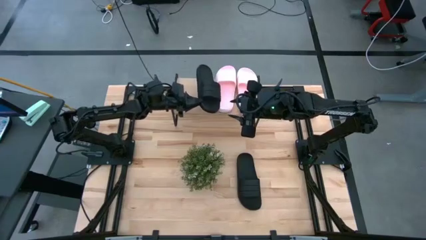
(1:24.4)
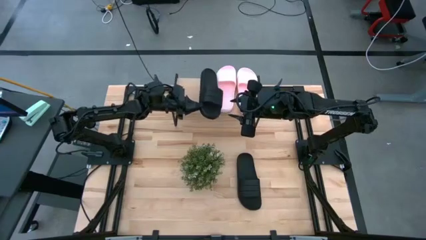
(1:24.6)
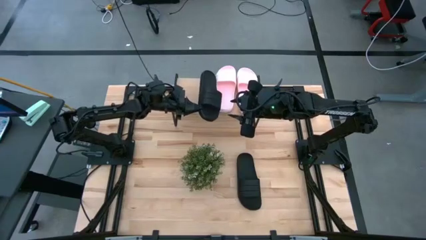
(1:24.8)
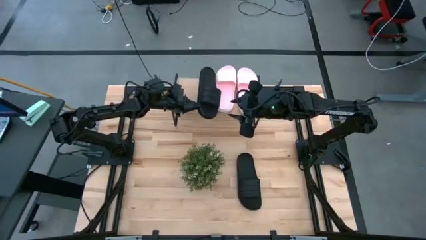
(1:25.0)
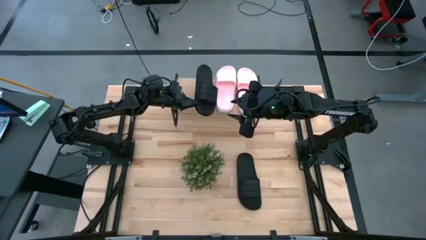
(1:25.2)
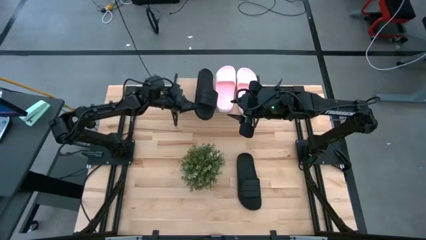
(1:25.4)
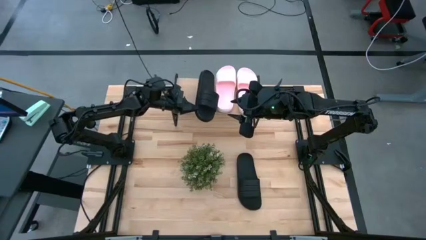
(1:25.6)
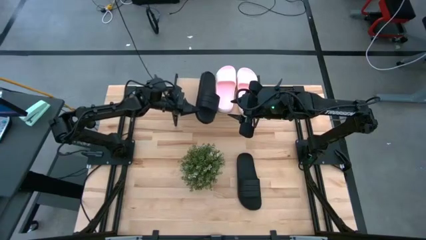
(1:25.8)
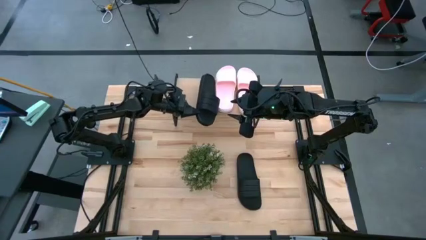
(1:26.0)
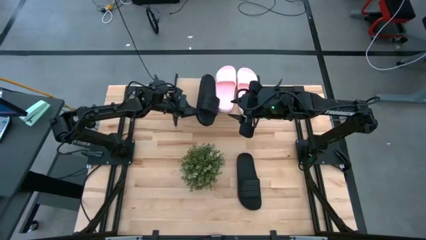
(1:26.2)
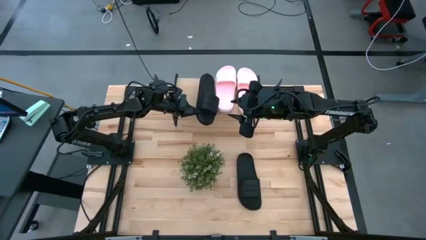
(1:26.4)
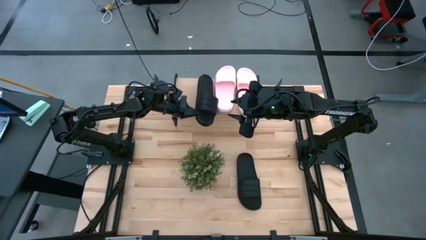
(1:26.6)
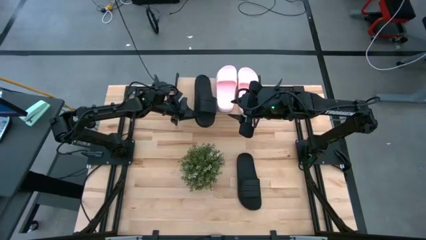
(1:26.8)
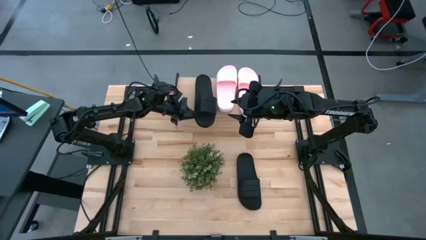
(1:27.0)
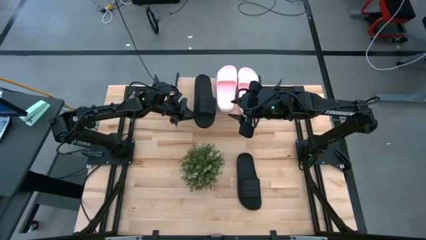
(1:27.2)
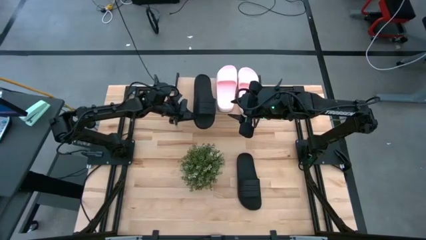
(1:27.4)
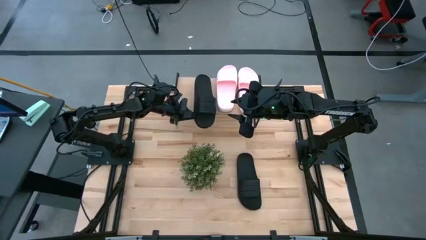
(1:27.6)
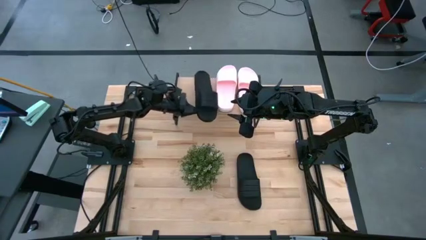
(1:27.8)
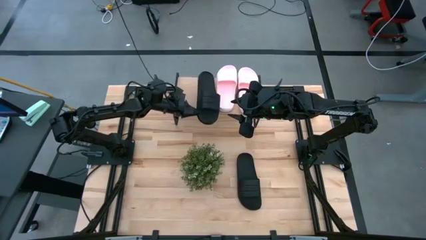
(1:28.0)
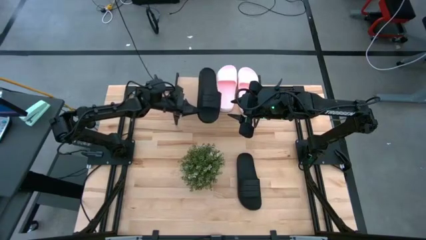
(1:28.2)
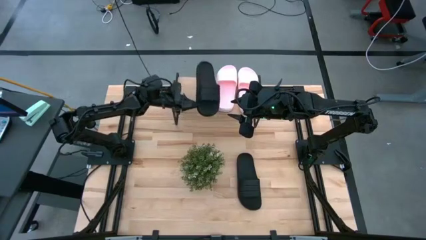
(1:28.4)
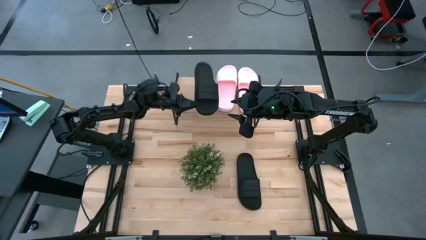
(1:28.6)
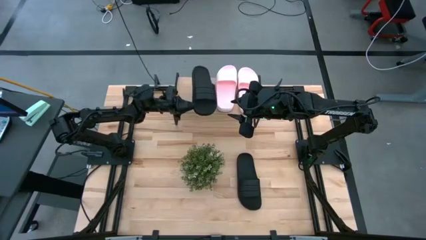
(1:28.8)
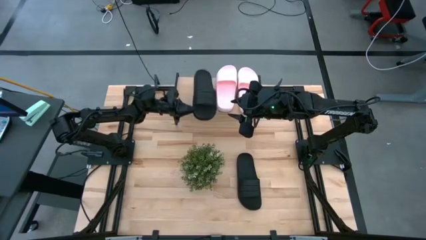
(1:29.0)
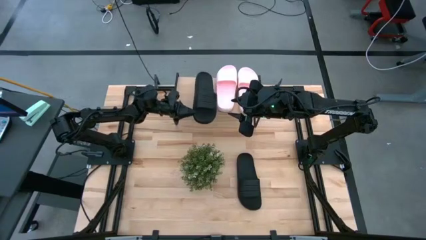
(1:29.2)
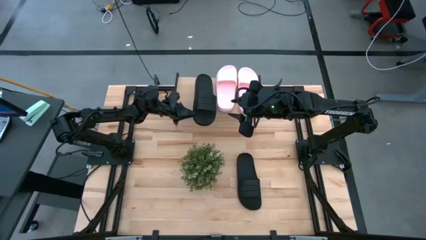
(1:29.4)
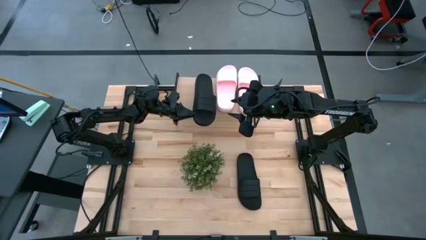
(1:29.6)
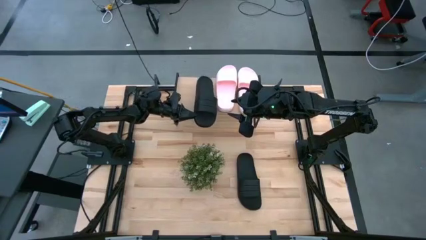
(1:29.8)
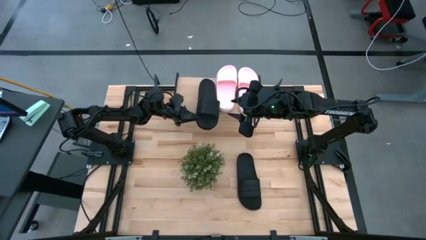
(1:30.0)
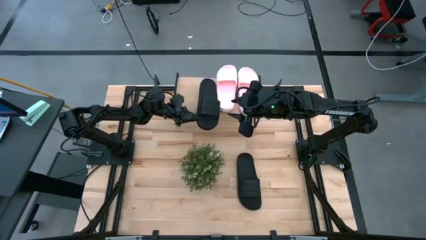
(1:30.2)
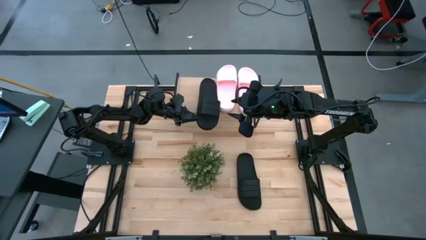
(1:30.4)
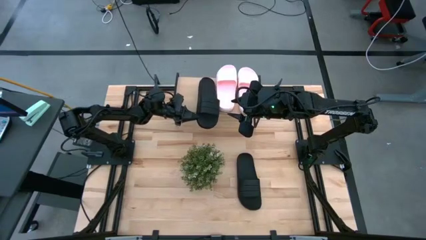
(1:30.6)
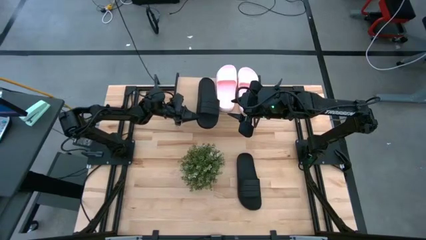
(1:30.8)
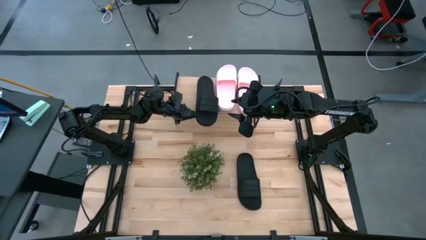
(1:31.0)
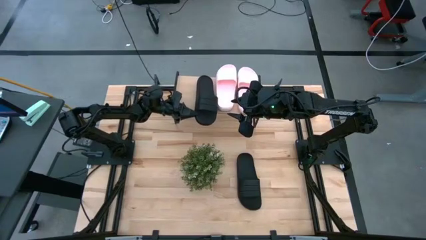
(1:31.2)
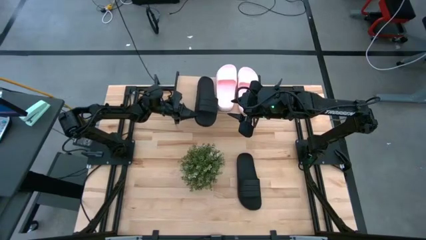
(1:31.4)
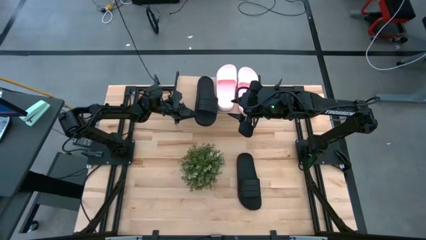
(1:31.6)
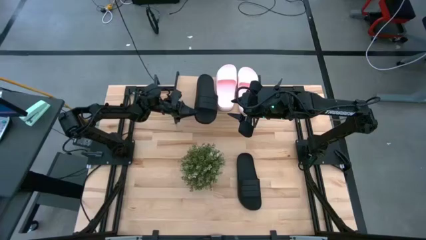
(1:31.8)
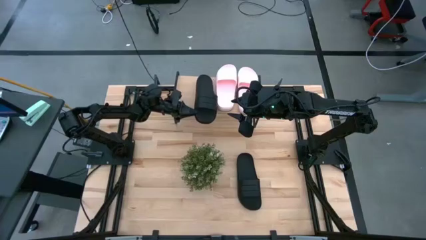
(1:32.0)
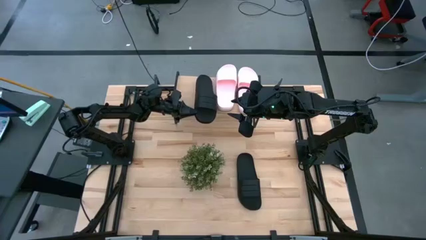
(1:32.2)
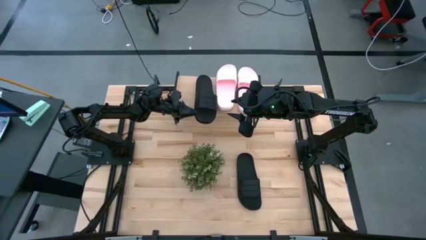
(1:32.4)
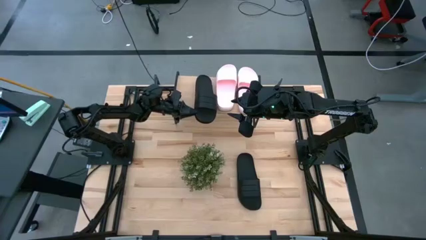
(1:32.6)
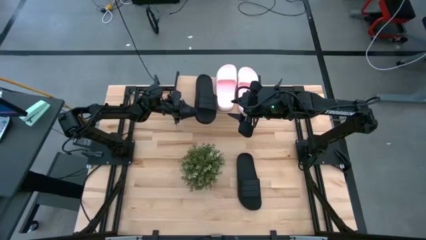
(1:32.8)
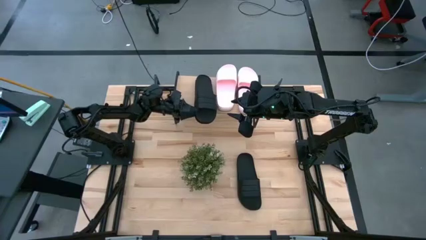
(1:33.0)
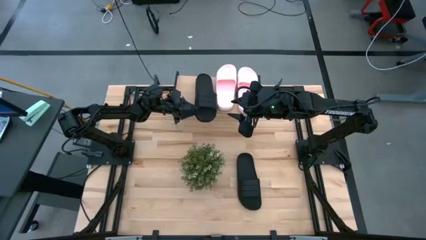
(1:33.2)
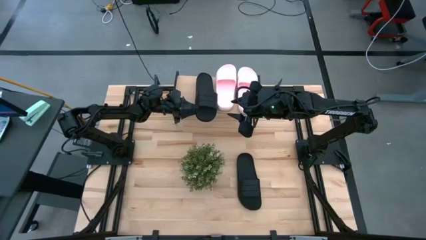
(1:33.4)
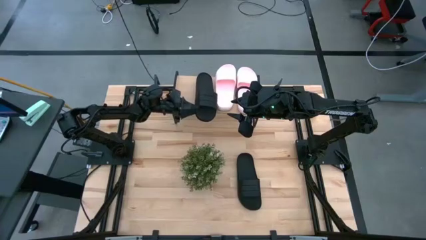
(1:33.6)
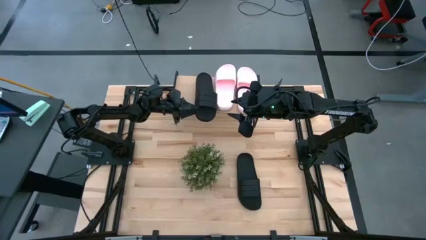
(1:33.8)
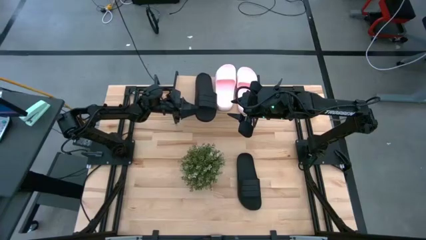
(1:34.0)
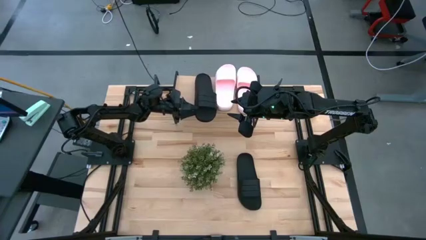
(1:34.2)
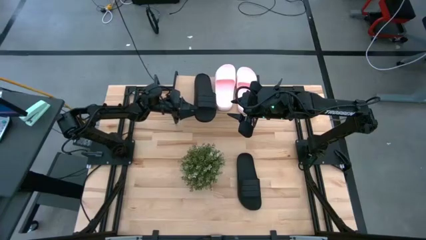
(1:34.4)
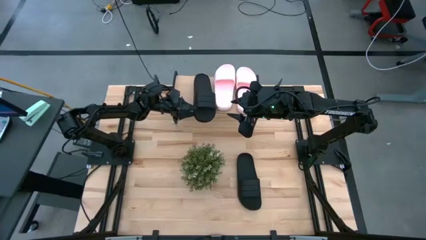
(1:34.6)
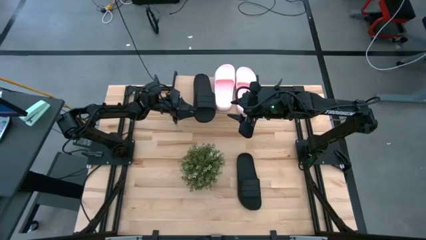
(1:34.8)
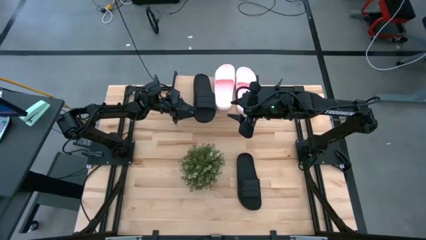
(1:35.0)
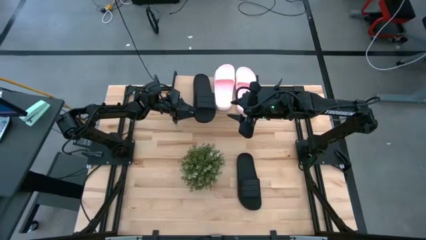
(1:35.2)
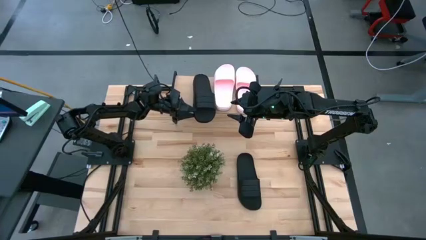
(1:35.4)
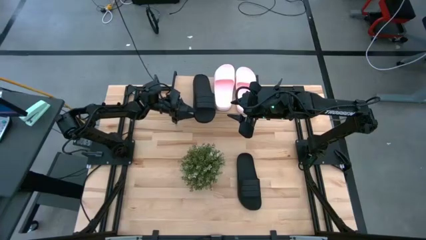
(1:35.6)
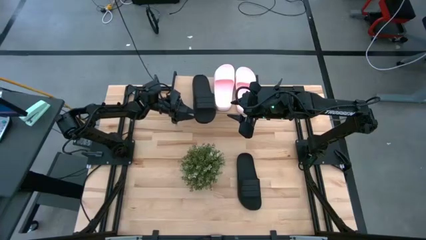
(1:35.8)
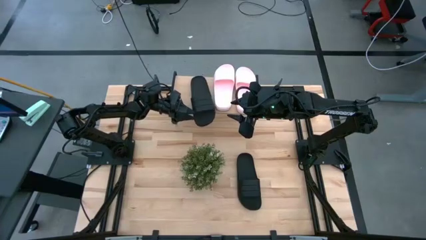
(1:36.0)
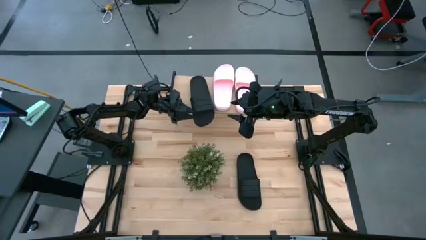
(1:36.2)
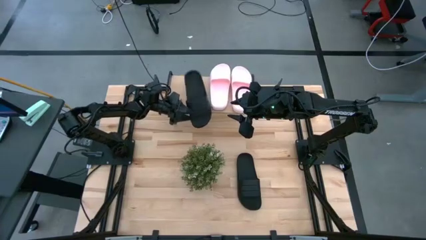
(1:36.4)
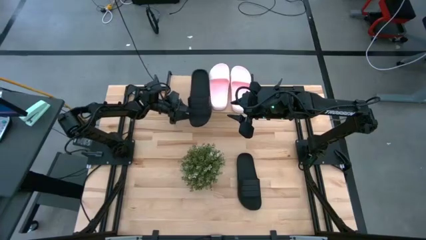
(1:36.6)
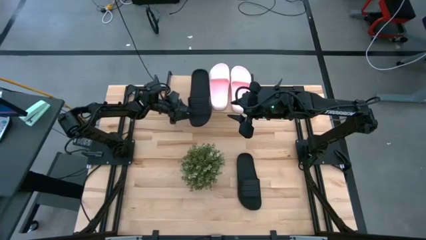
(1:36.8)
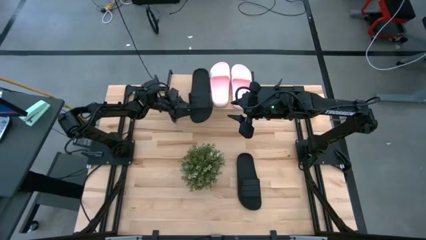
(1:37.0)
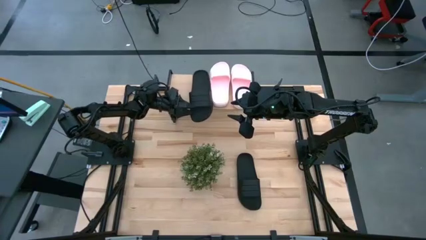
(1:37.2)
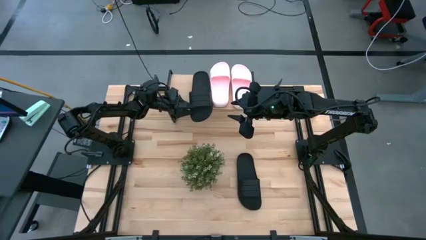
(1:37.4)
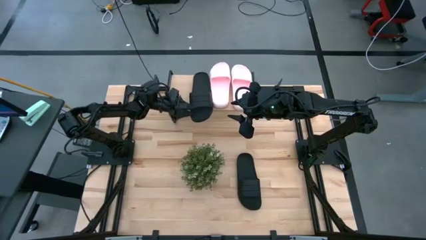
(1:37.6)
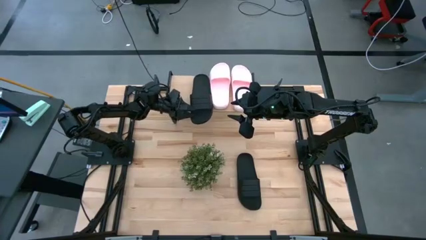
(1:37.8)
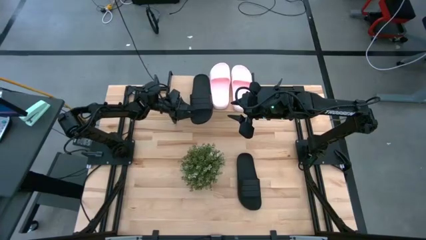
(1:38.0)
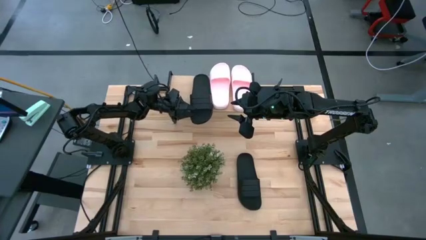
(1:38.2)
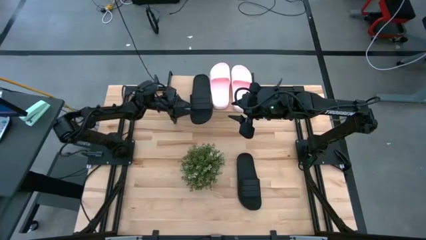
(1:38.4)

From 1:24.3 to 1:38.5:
Task: Pick and place slides into the shelf
Put the left black slipper on the shelf

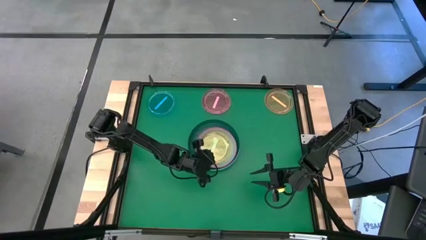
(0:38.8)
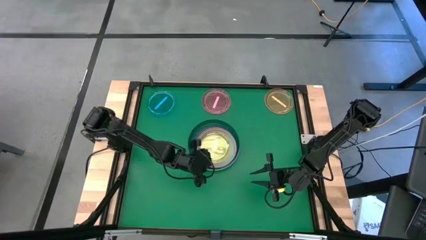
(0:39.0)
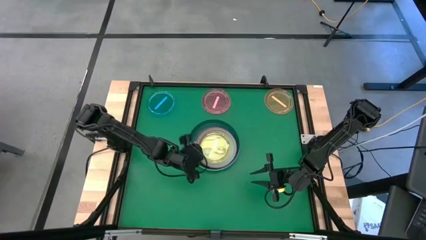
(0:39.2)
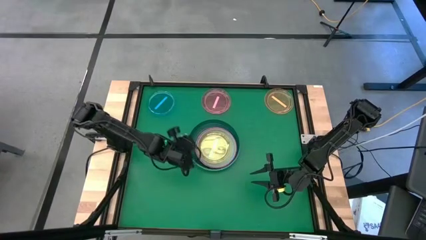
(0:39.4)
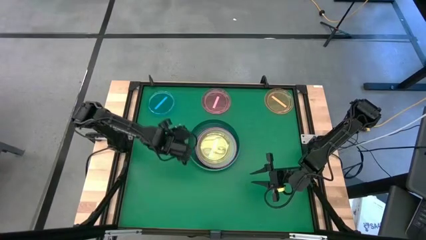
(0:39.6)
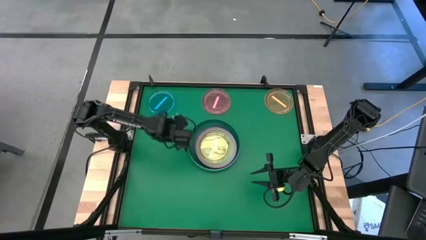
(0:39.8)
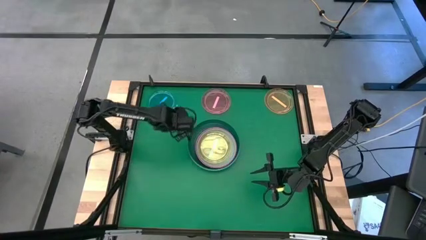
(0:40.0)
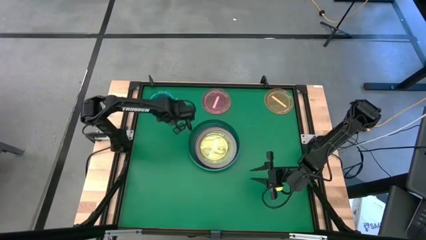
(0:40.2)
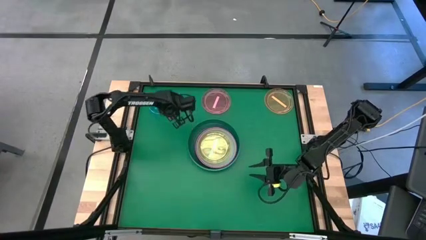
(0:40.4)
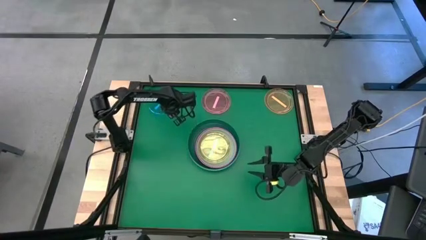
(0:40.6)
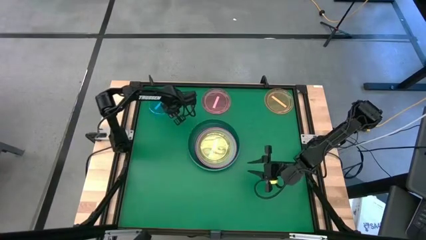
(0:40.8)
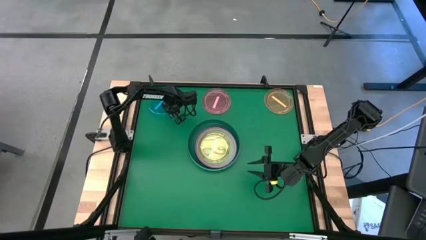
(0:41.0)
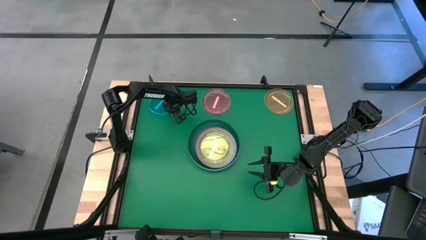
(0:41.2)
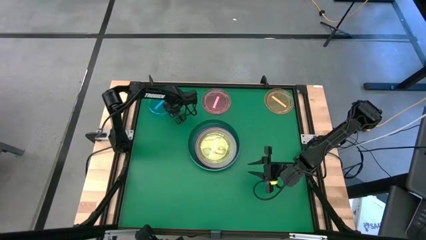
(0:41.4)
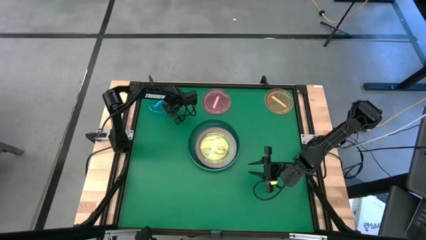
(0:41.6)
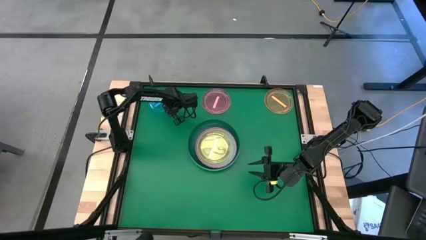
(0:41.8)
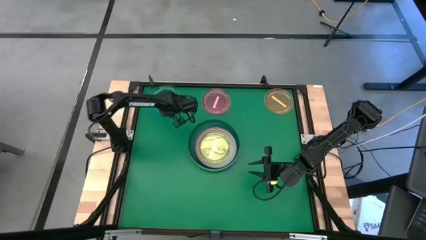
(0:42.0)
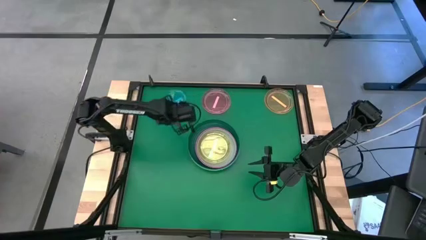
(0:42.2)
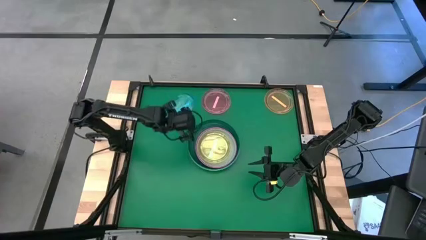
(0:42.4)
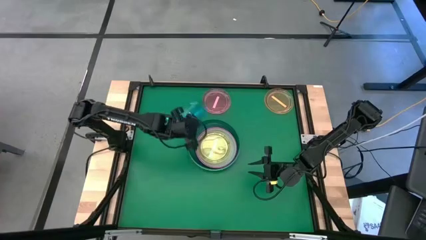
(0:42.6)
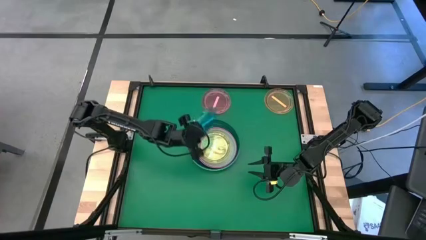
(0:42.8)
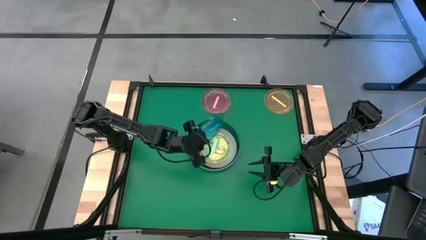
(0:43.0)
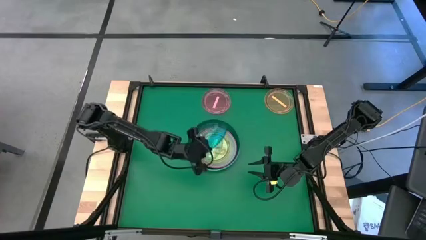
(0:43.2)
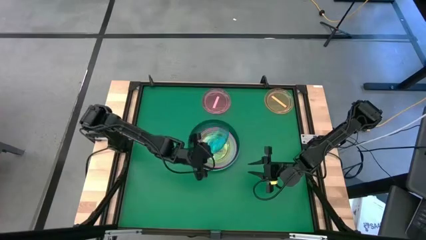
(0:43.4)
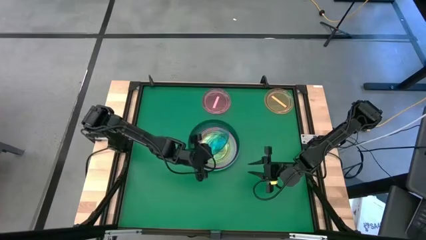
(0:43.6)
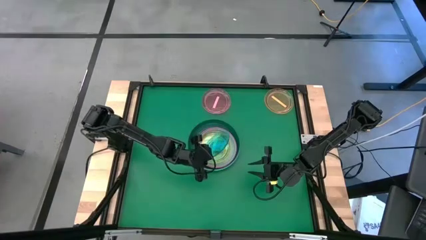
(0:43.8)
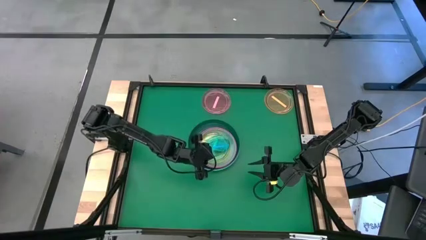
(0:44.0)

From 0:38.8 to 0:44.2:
Task: Stack plastic plates
Stack the blue plate on top of the green plate
